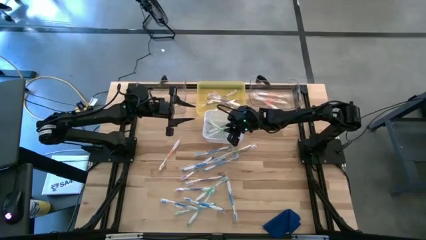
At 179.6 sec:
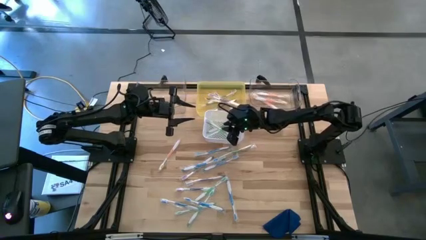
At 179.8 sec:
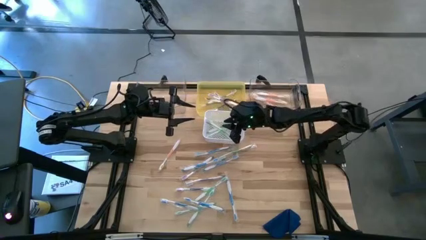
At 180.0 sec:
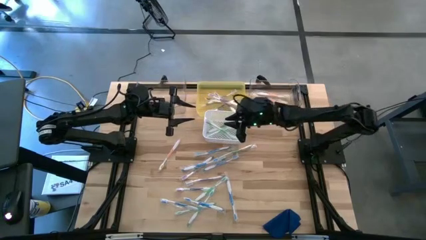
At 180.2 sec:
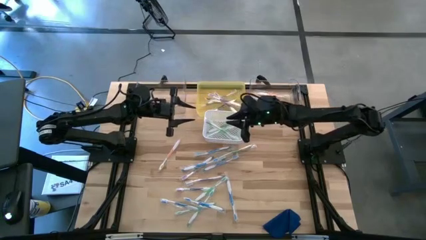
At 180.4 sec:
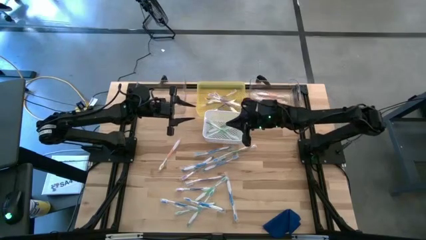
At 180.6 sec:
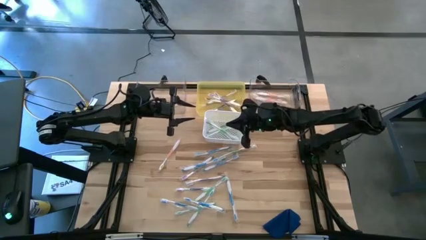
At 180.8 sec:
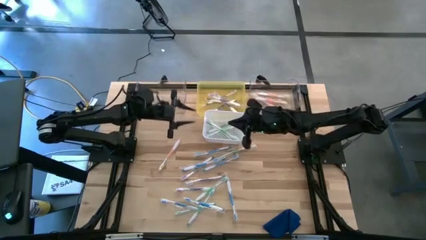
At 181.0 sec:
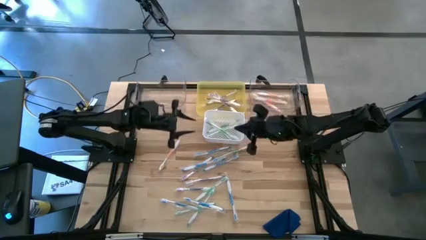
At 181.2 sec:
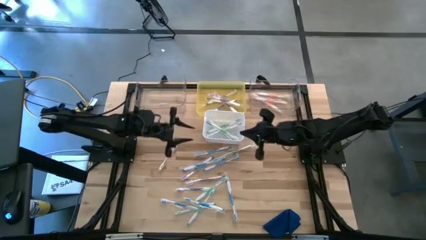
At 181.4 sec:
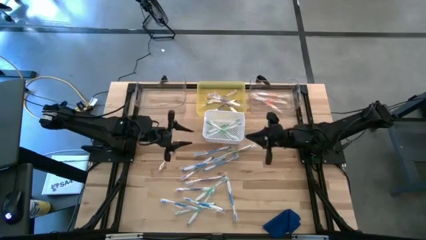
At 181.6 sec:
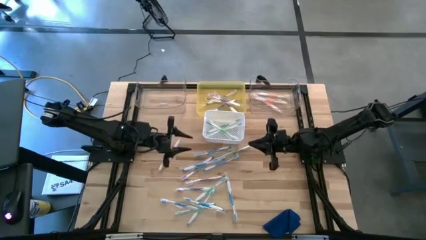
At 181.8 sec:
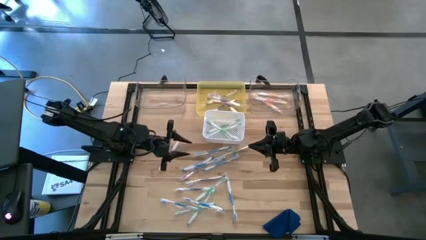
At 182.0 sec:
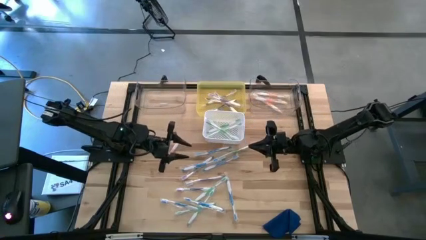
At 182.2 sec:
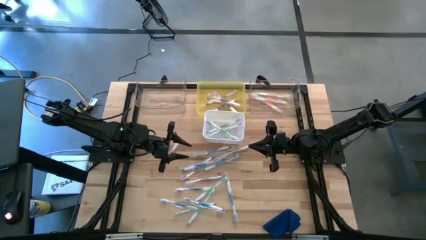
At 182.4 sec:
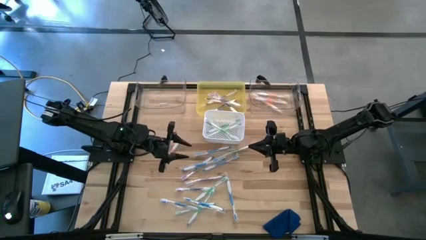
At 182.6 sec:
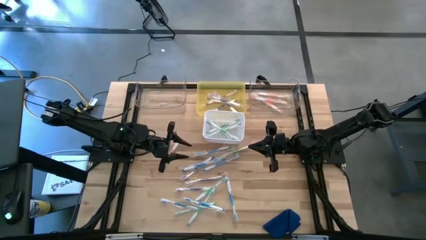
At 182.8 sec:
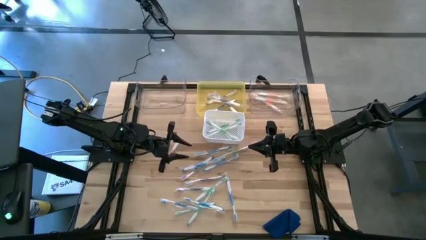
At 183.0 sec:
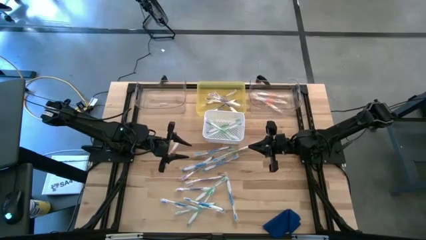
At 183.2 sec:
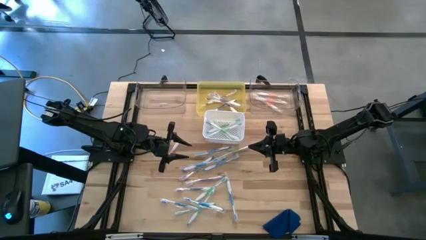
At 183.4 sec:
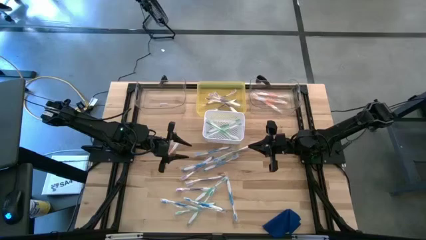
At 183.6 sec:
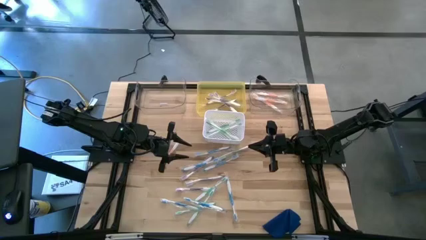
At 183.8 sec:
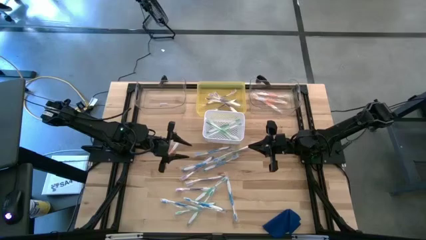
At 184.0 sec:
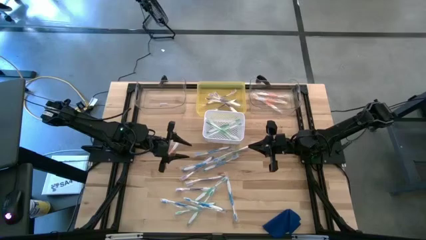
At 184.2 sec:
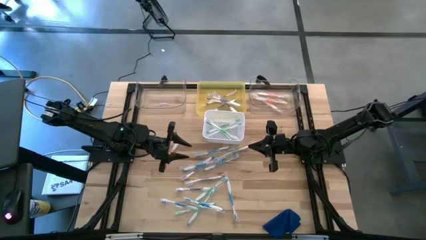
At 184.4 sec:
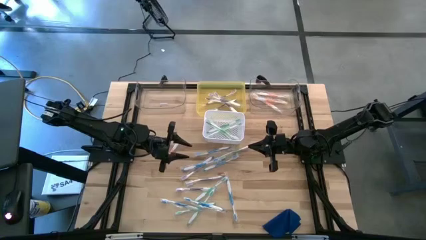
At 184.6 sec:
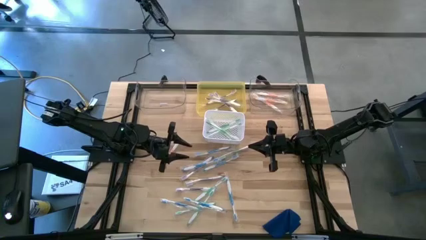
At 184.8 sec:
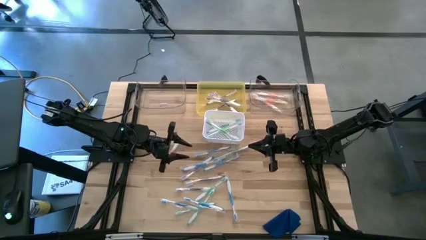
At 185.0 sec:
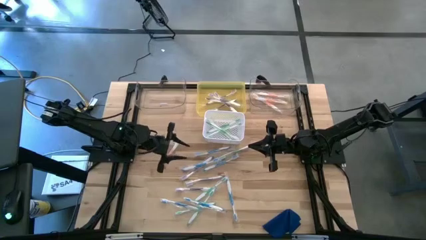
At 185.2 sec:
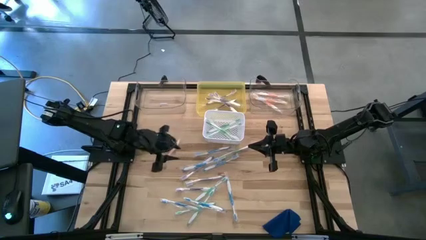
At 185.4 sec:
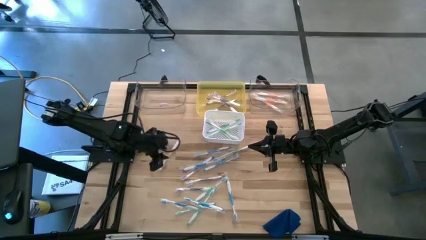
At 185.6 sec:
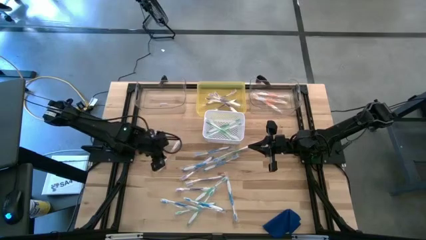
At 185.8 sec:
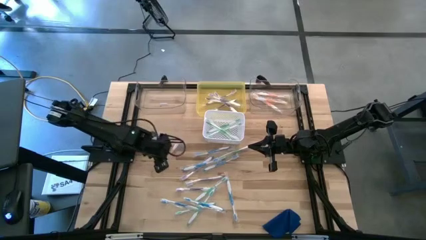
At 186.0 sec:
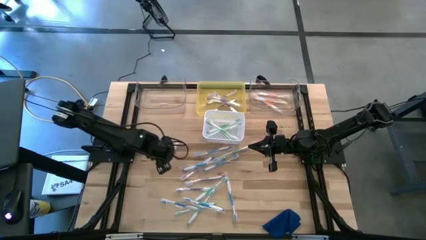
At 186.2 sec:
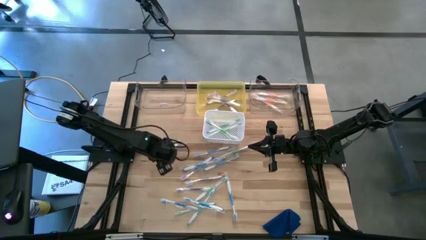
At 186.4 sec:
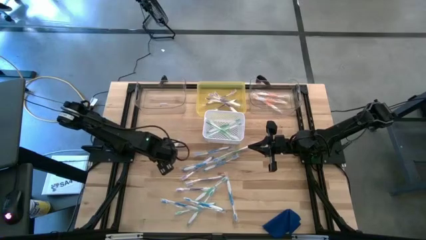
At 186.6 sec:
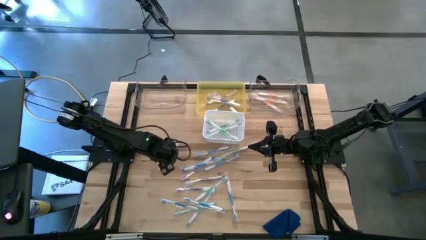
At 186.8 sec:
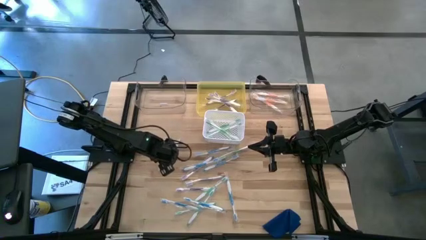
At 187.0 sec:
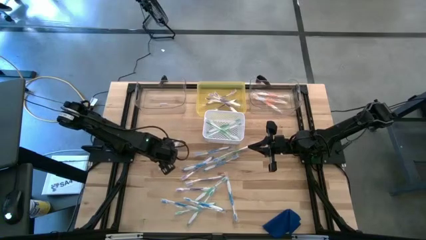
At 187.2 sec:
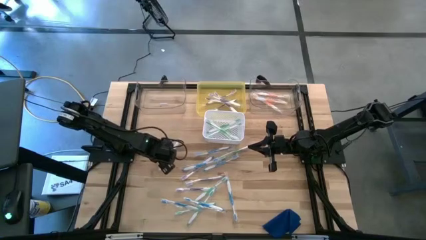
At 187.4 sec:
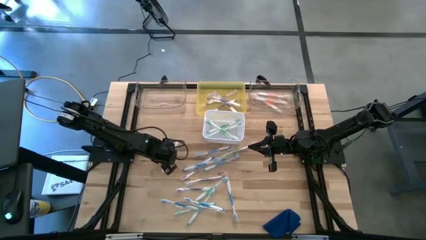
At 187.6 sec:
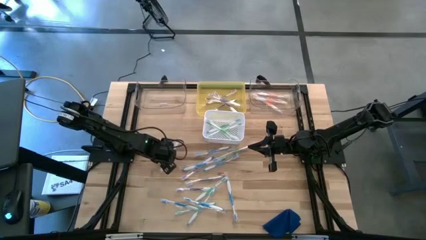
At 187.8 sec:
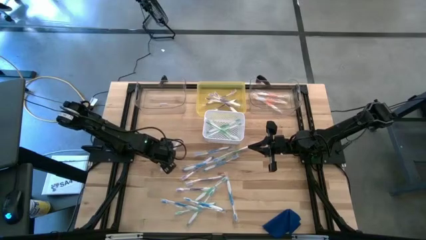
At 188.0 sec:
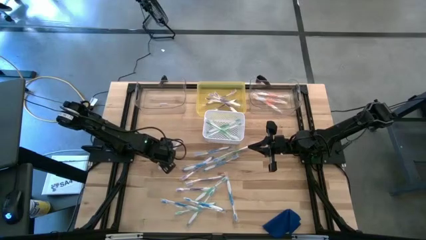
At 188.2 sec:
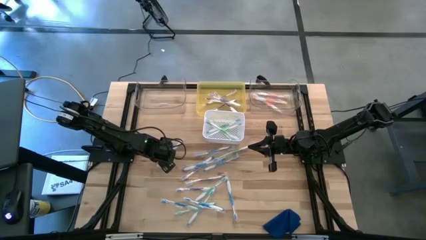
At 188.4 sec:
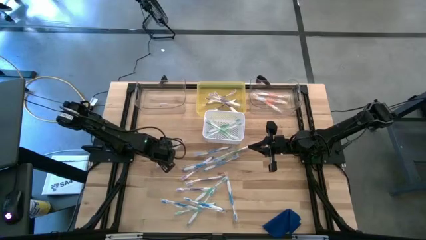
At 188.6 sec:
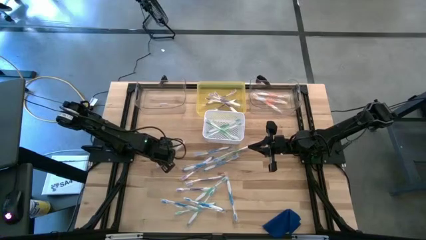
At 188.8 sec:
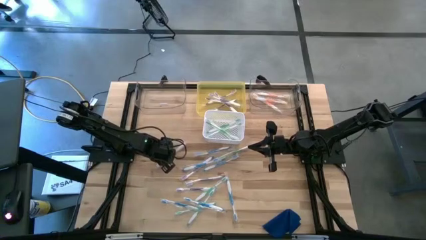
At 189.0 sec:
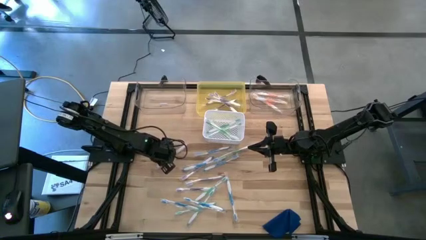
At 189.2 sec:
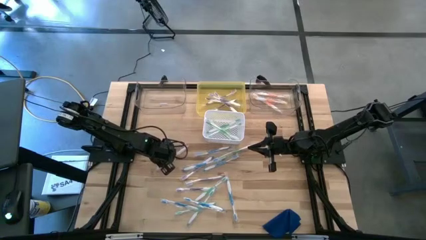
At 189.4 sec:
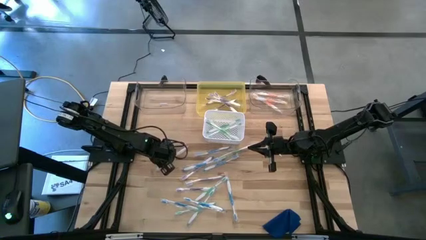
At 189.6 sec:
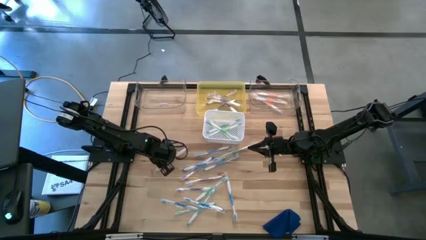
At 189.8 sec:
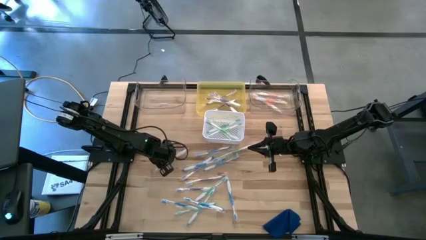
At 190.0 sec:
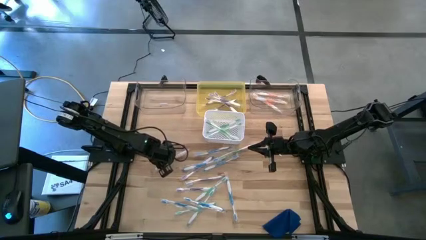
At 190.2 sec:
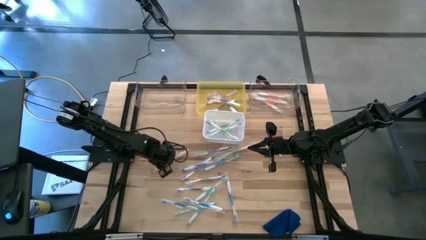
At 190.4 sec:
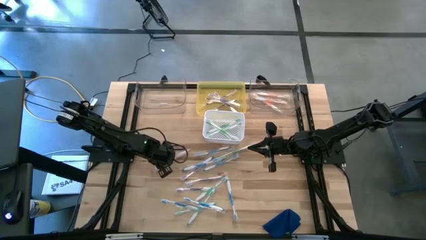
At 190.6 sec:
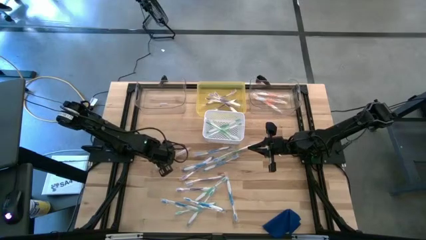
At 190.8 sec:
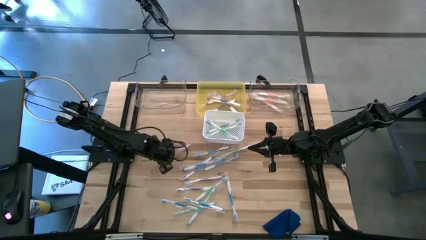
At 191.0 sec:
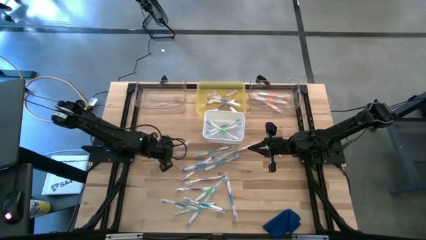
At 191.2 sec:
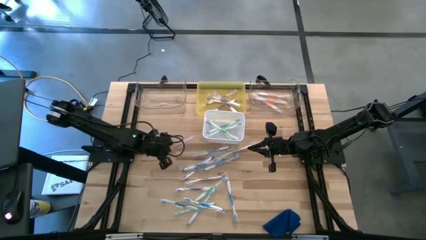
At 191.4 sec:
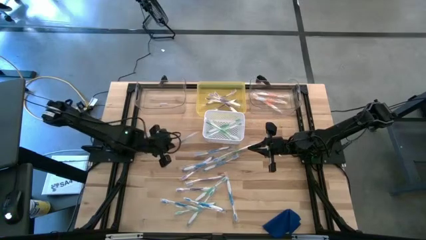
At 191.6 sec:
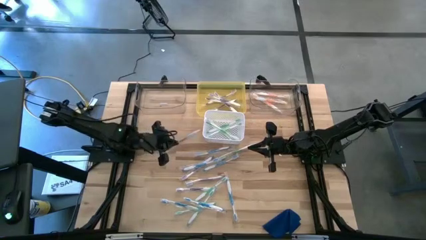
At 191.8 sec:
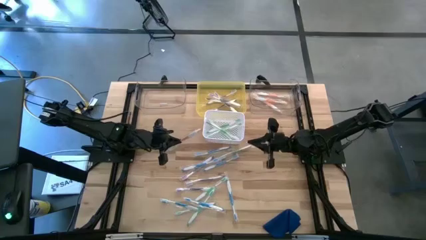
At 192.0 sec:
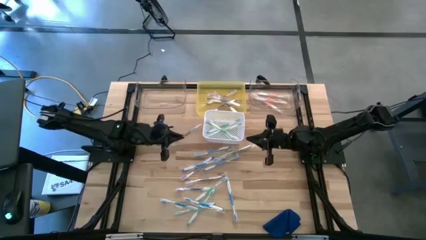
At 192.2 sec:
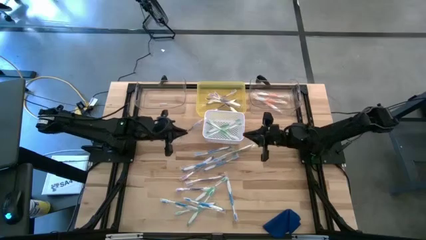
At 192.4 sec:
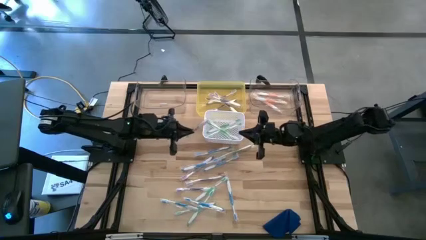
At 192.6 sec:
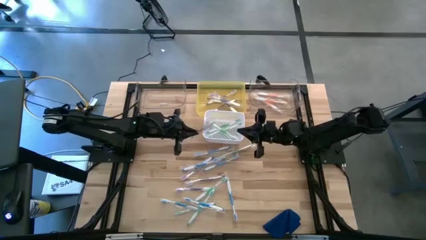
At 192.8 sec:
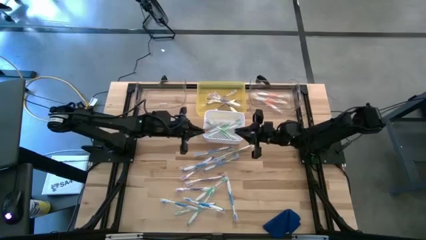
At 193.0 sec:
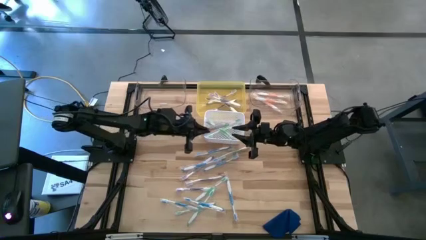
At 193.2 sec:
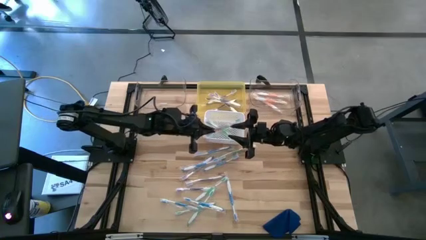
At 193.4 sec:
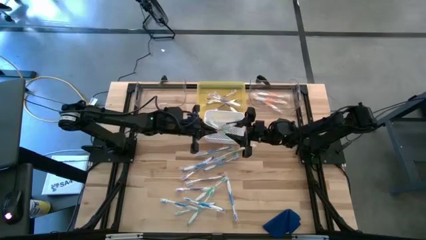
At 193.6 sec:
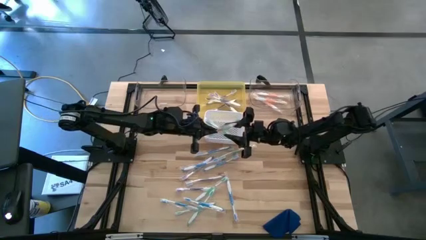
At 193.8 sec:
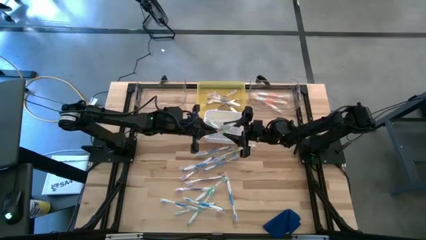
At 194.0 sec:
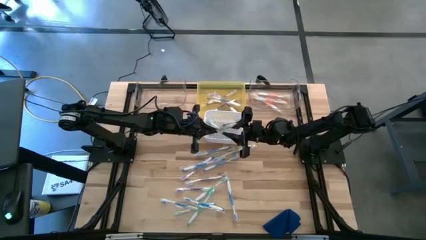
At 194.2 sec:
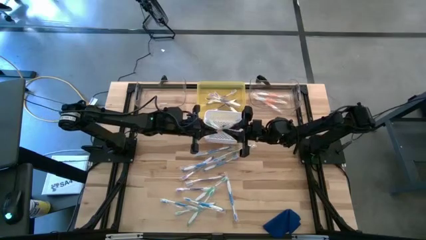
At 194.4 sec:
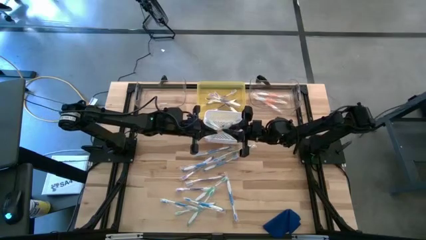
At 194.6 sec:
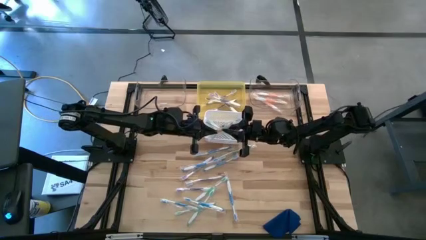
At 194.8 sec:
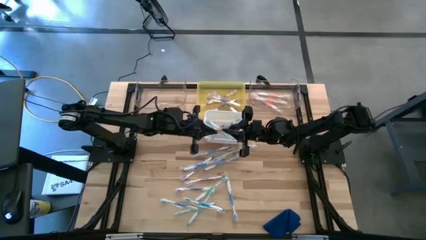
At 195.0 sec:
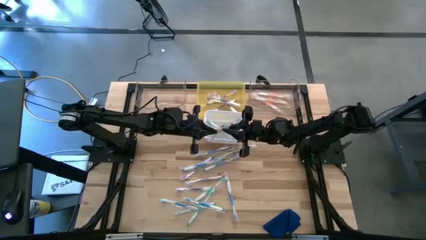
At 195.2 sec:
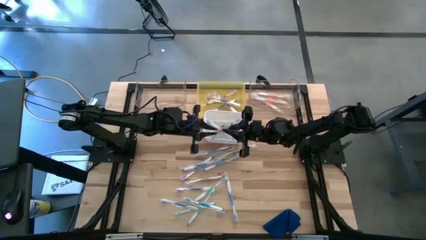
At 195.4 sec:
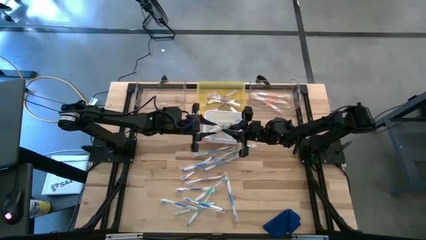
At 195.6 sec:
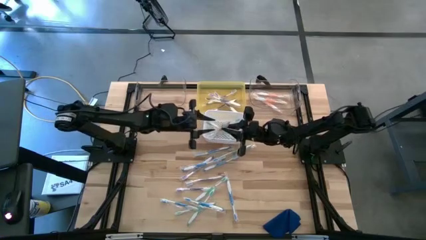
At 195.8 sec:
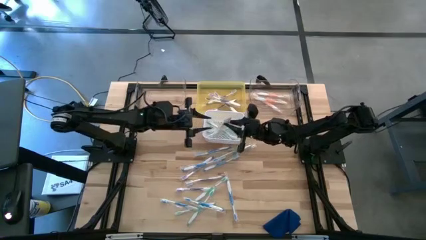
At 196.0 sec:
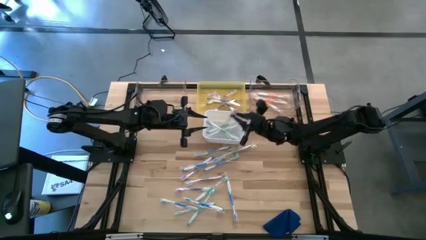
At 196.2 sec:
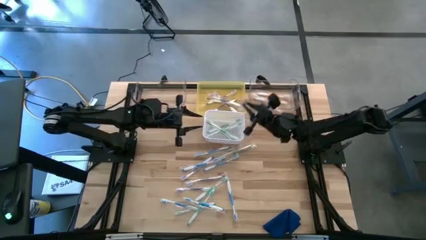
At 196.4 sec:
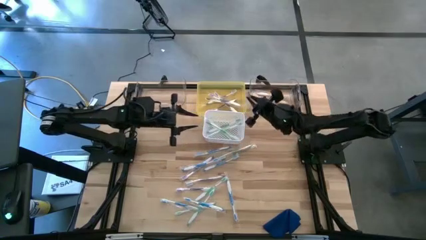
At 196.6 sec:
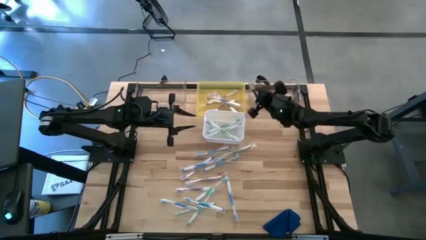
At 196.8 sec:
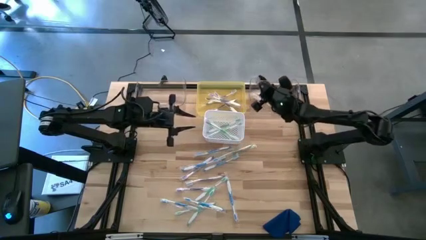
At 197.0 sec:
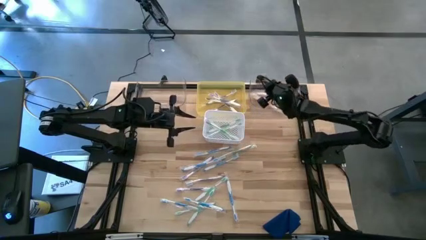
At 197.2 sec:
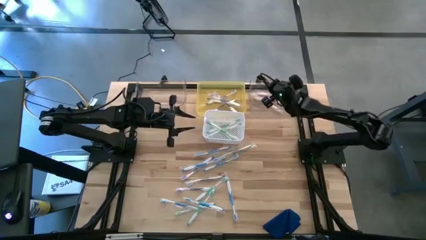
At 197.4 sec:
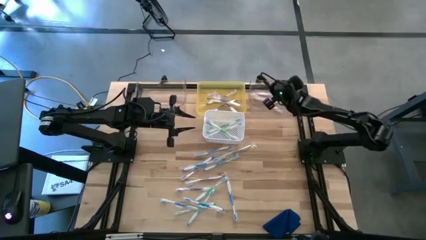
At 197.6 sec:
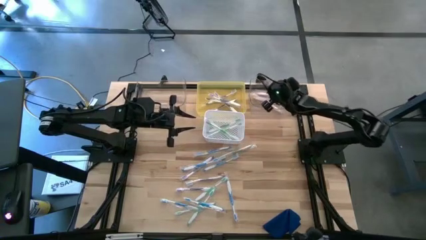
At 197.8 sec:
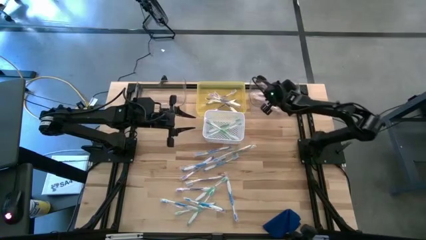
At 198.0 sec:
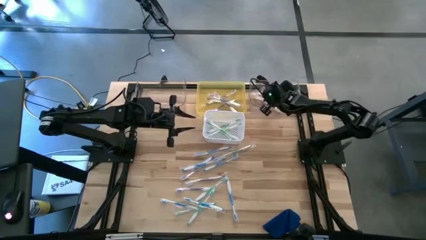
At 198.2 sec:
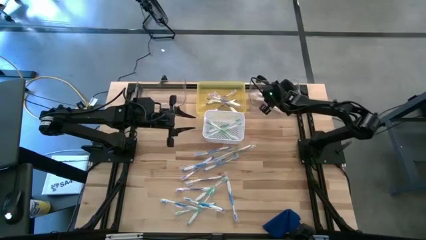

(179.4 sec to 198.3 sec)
Task: Pick & Place Toothbrushes
Put the orange toothbrush into the right transparent bin
